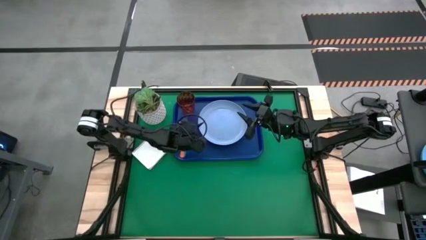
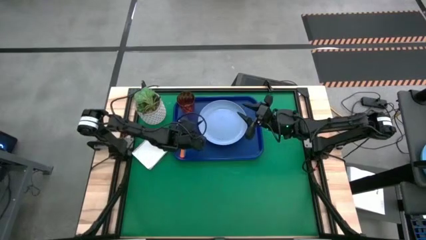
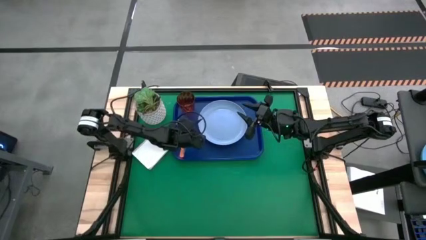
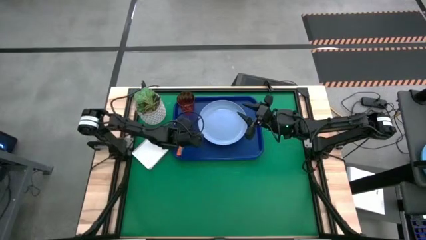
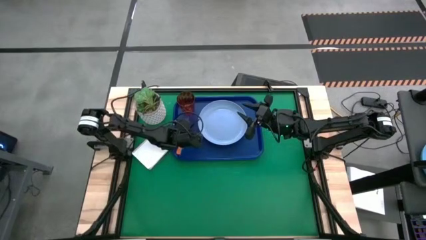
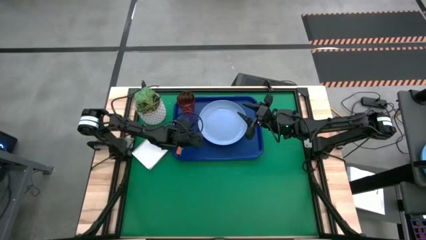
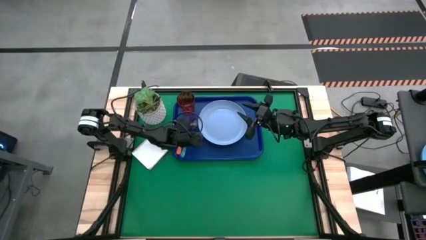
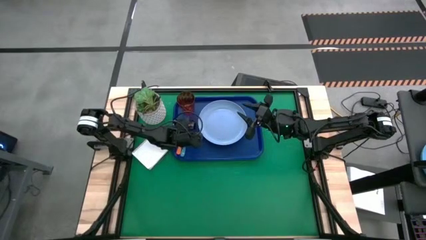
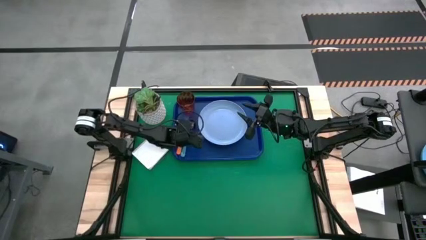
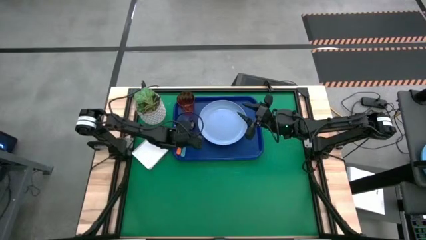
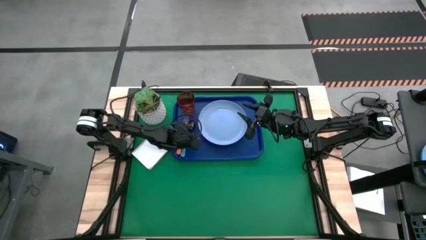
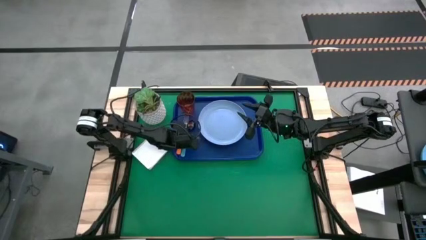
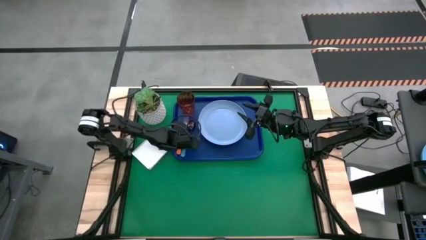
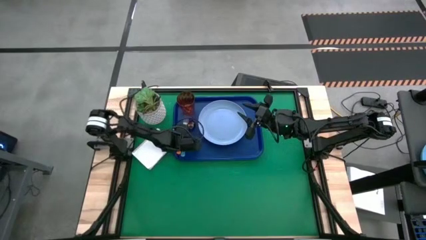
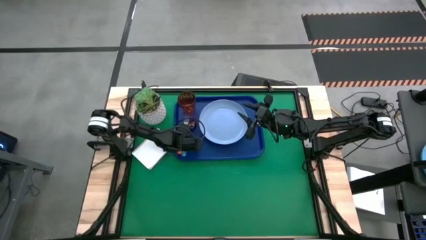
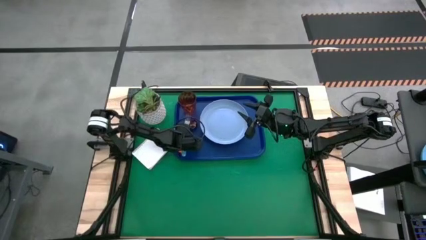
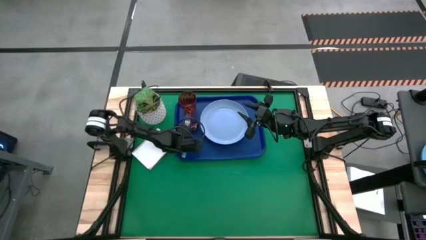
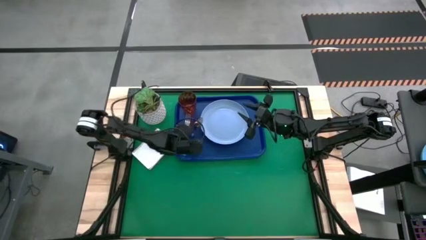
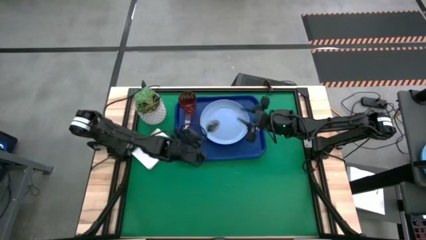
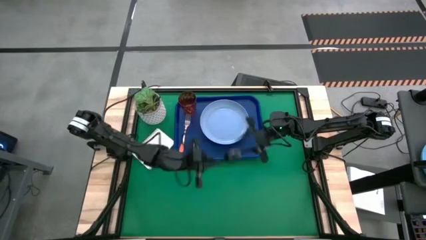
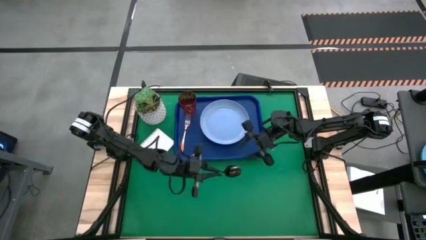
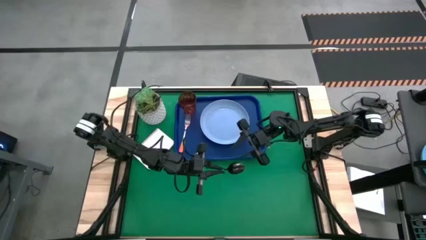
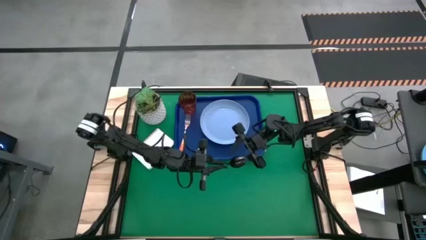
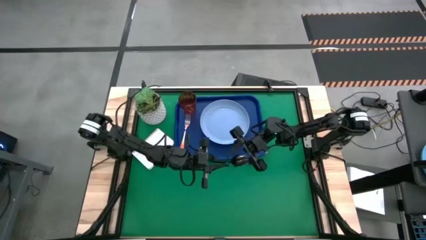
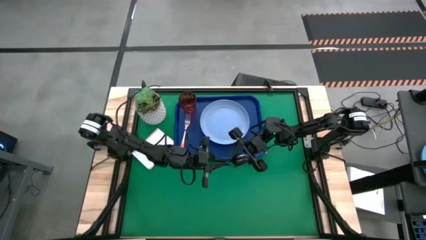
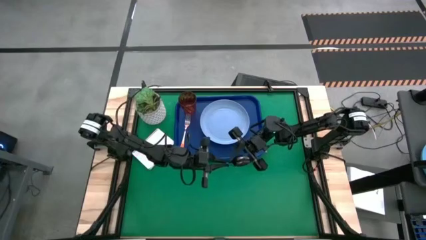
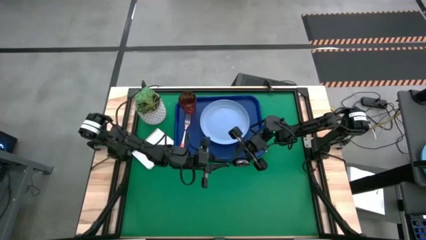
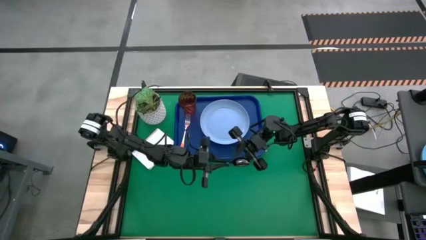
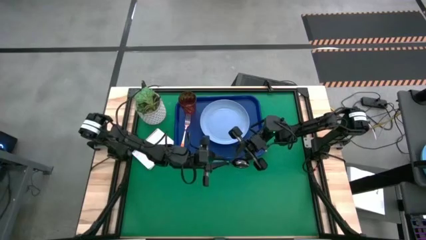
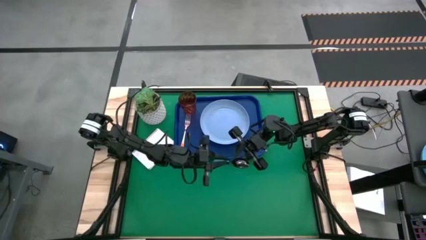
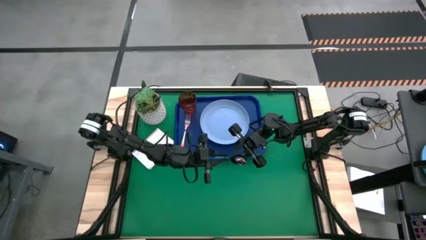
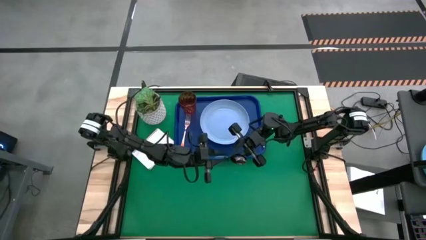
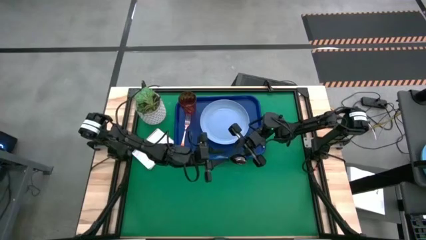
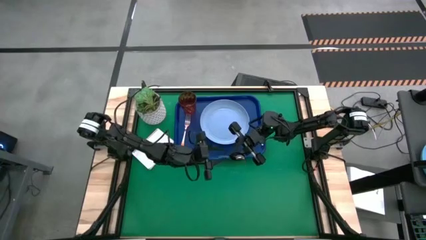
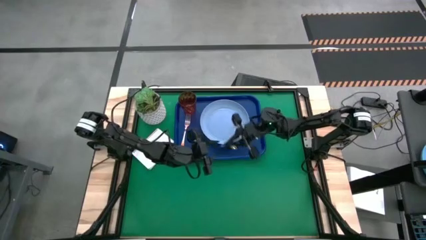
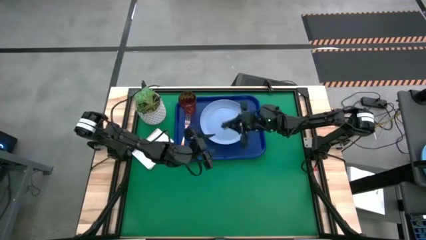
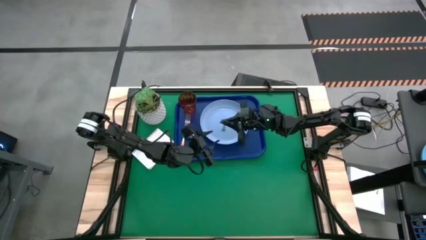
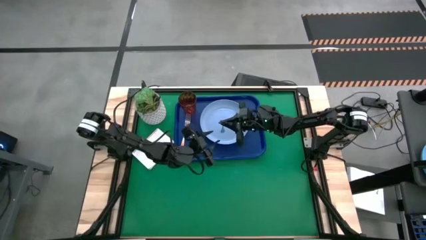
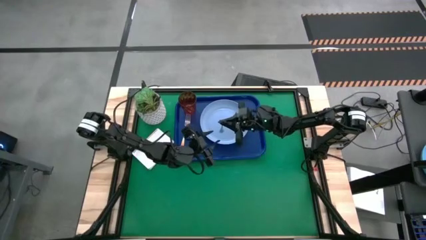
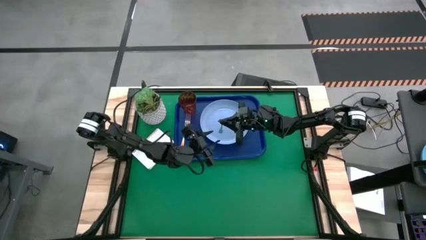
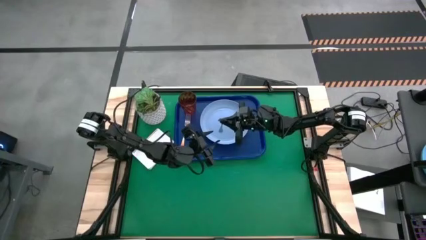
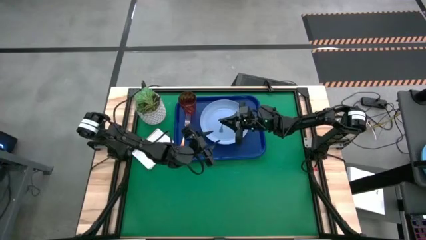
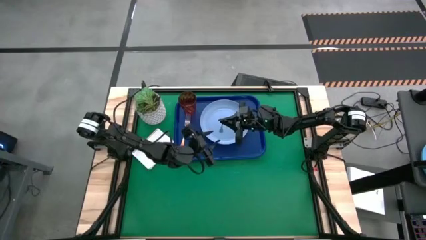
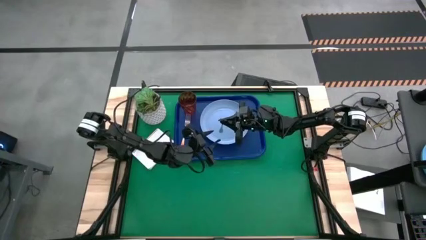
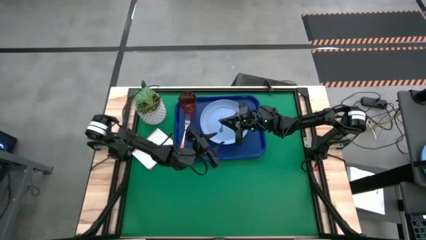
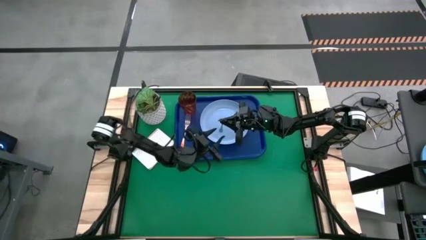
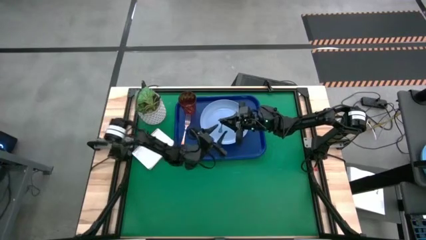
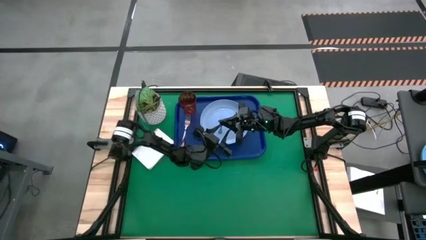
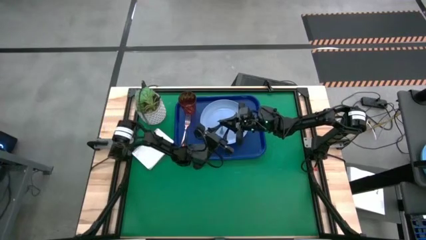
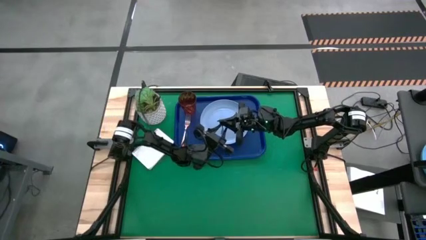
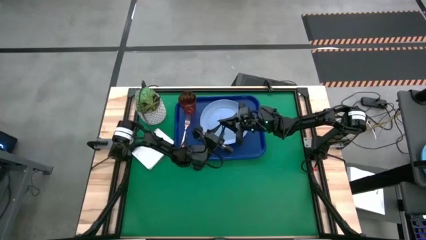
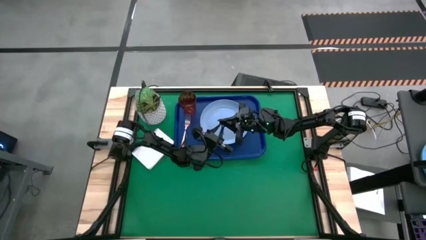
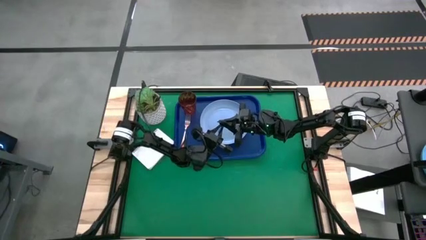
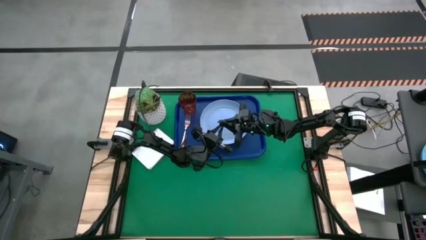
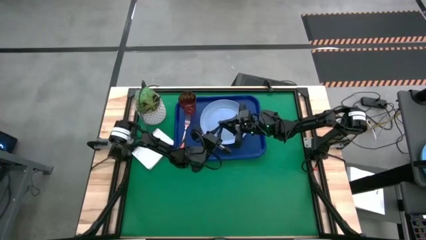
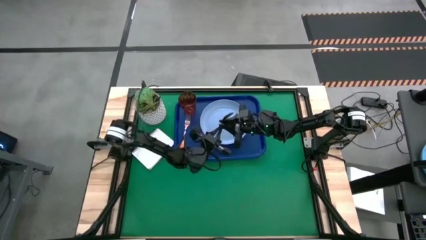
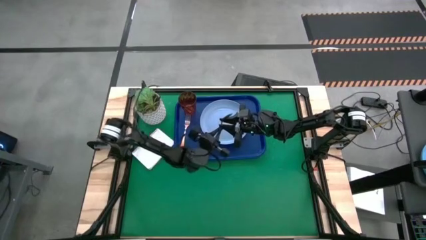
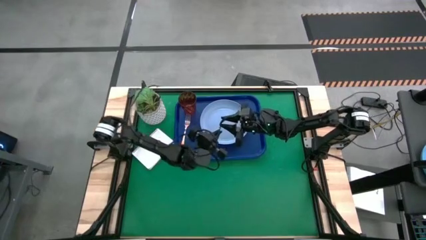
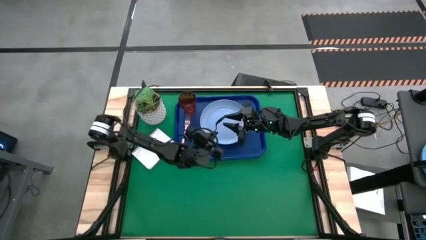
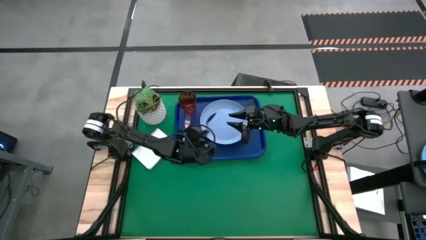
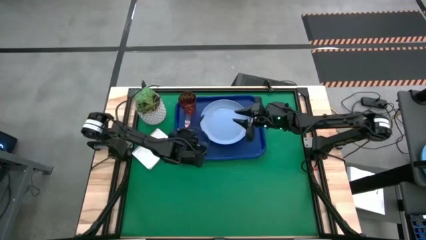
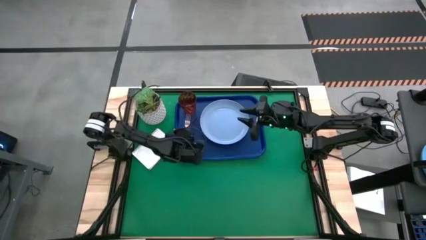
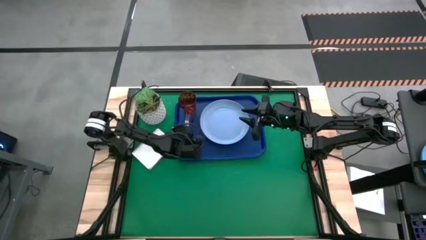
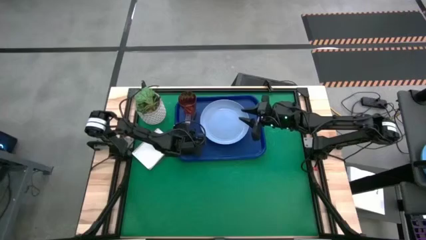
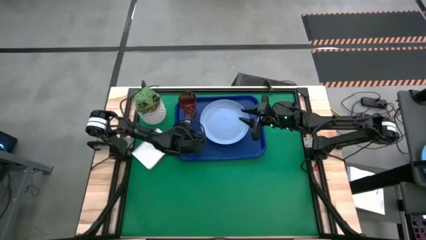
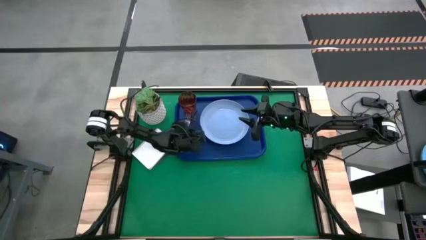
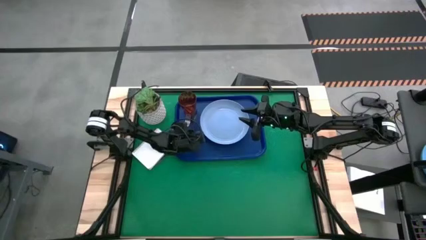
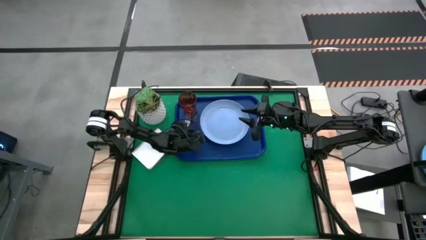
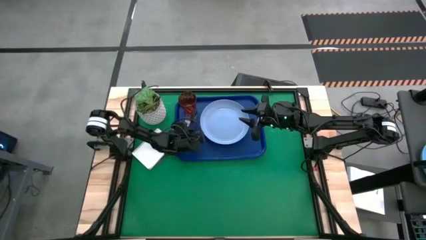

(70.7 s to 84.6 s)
Task: Pick and place plate/cup/fork/spoon on tray
Put the blue spoon on the tray to the right of the orange fork
